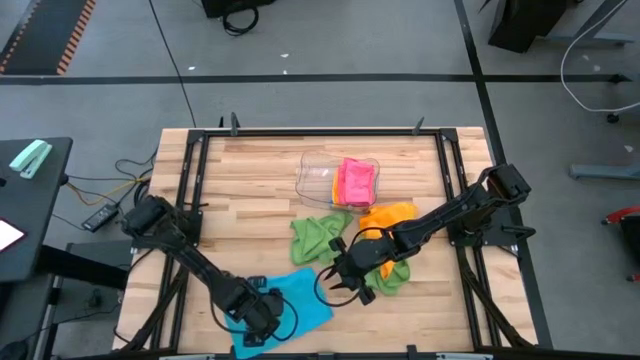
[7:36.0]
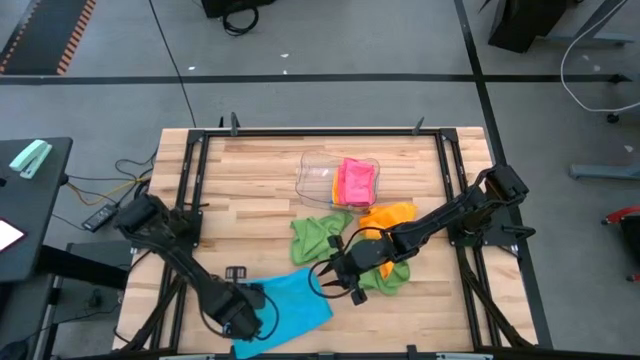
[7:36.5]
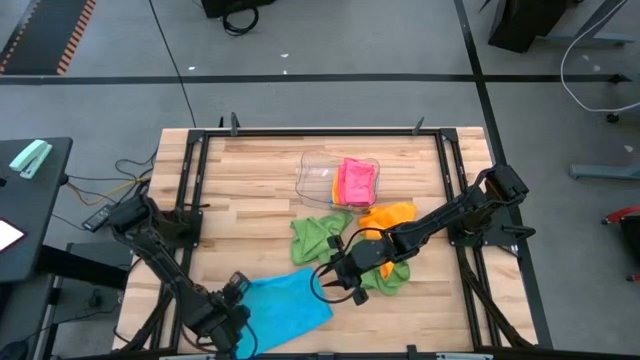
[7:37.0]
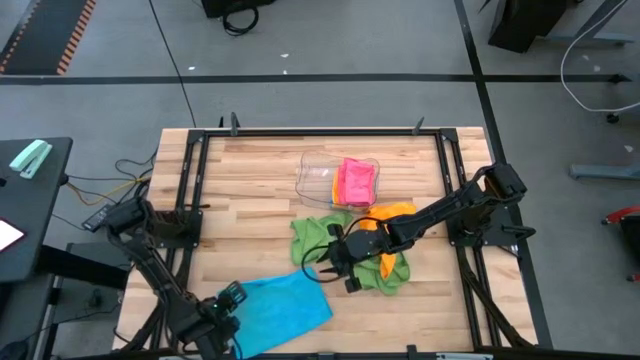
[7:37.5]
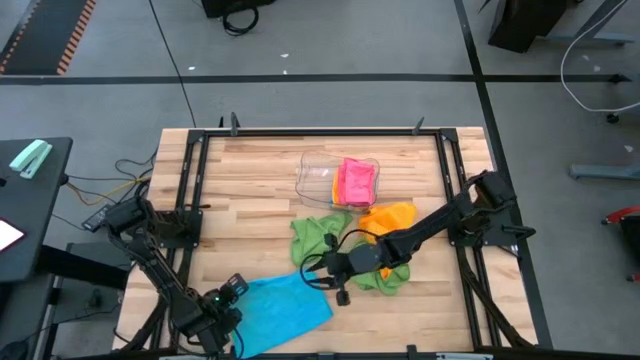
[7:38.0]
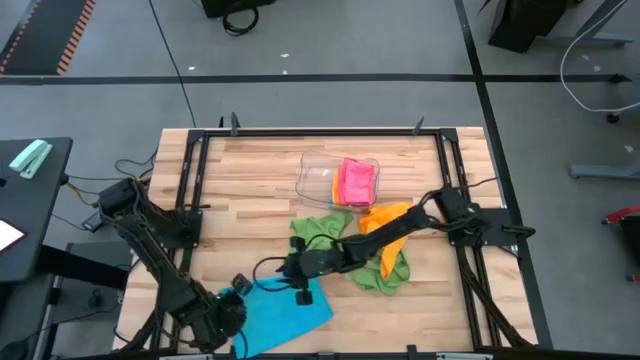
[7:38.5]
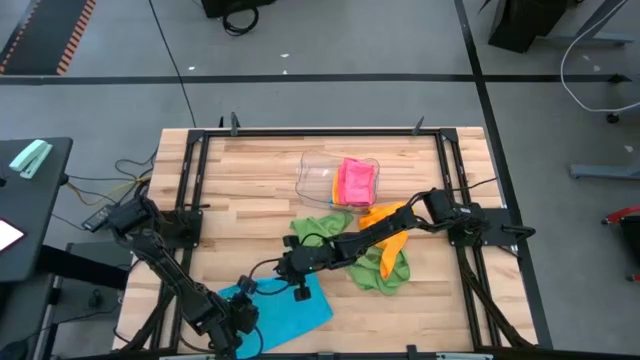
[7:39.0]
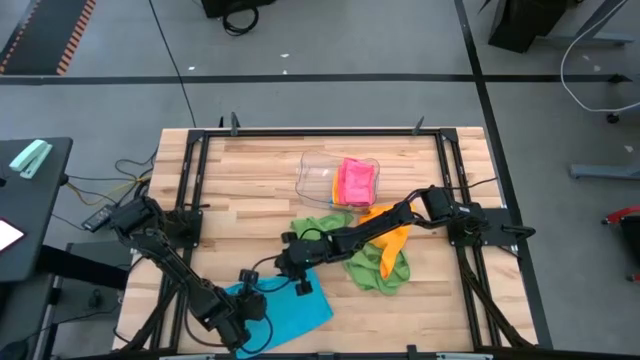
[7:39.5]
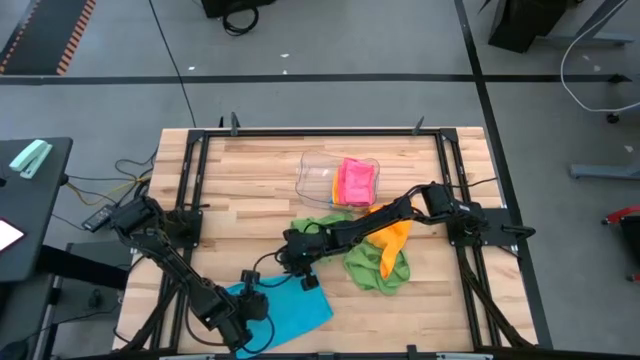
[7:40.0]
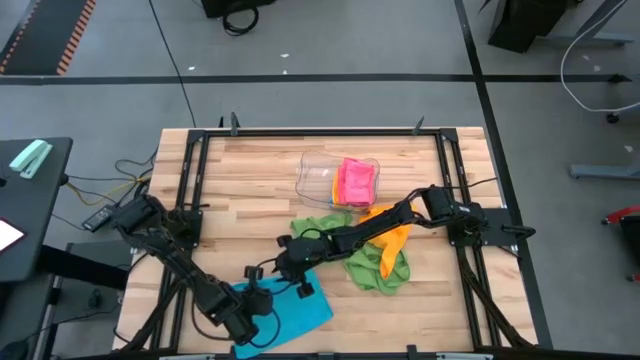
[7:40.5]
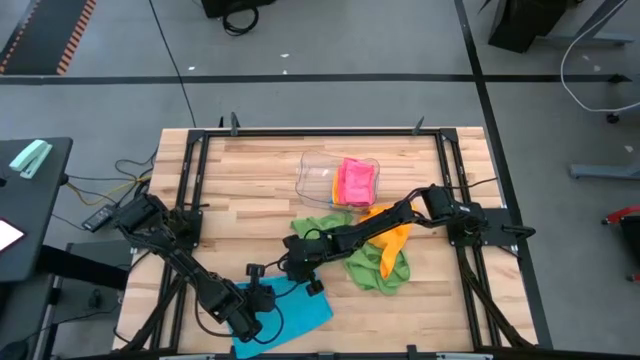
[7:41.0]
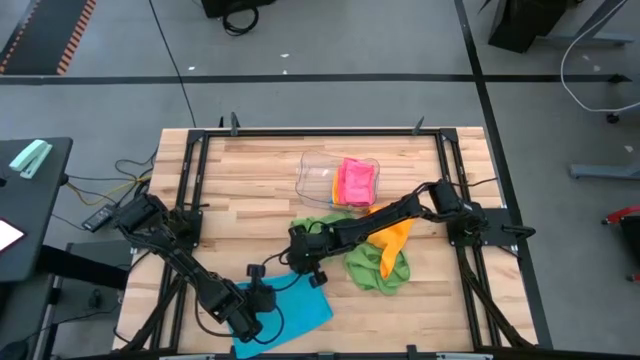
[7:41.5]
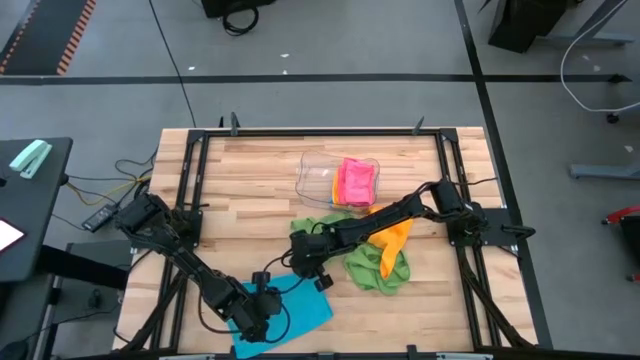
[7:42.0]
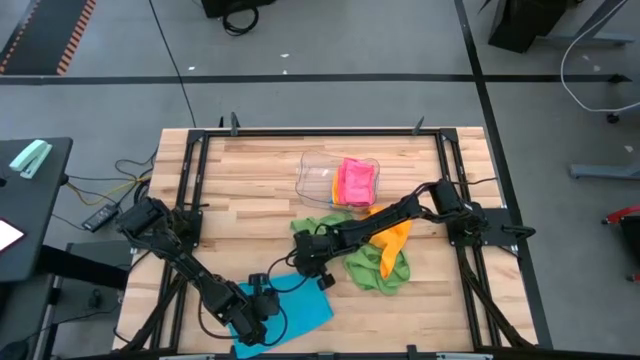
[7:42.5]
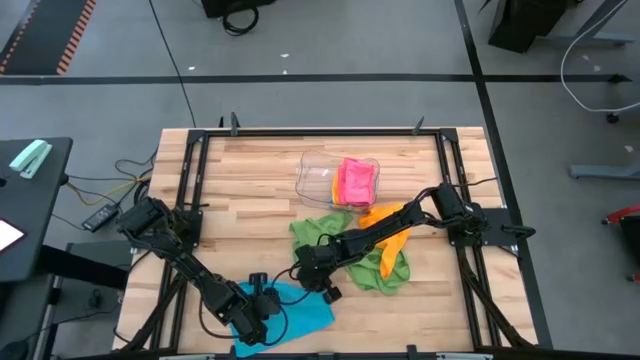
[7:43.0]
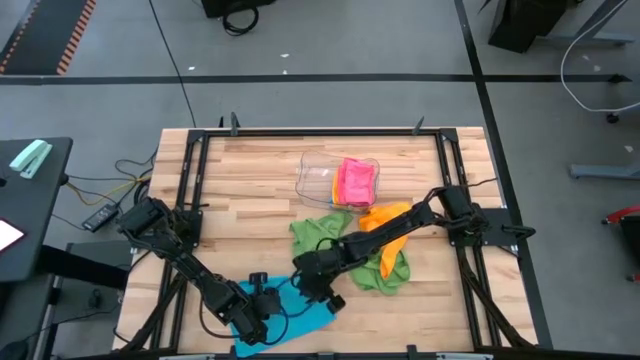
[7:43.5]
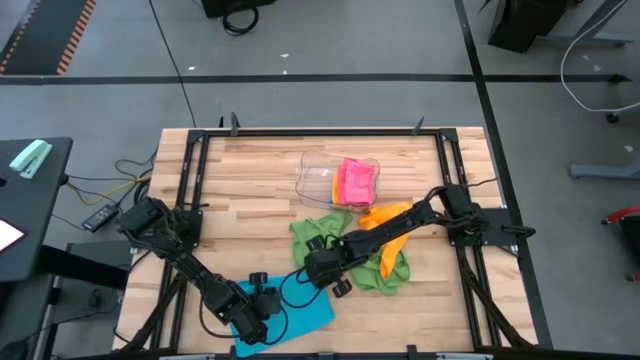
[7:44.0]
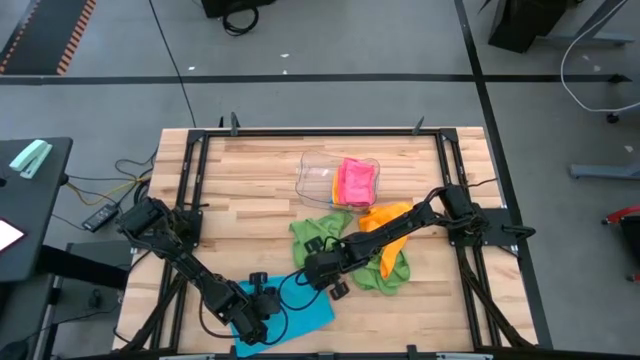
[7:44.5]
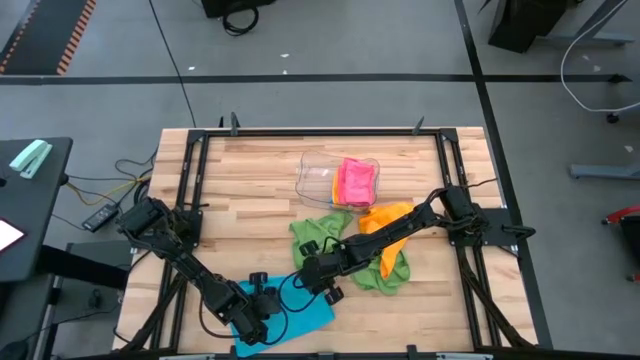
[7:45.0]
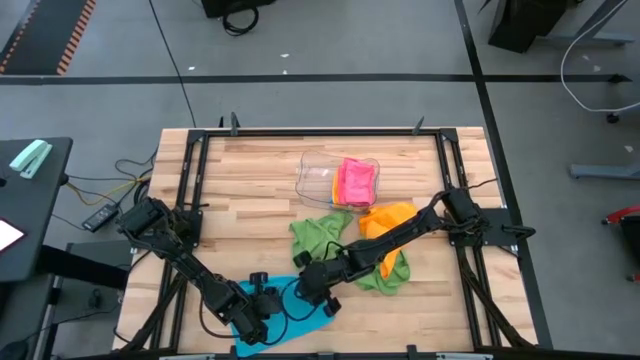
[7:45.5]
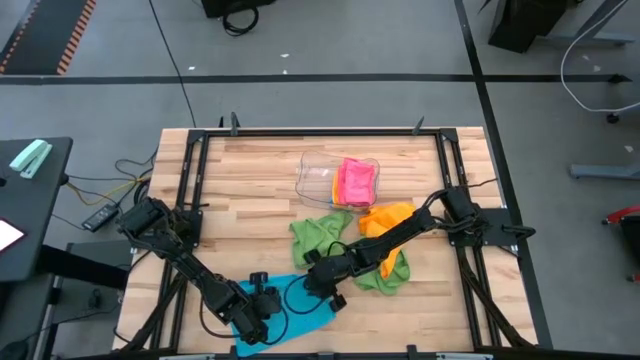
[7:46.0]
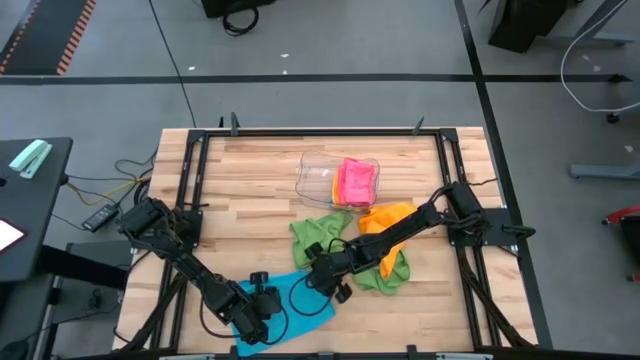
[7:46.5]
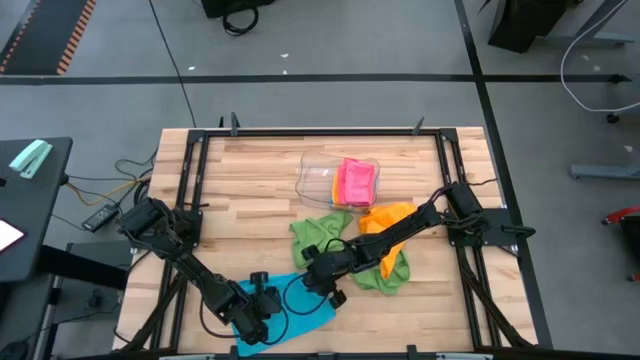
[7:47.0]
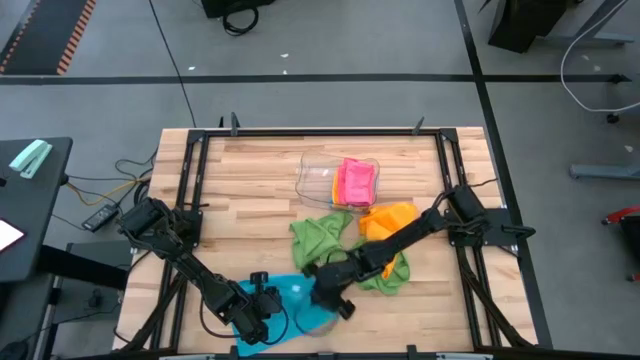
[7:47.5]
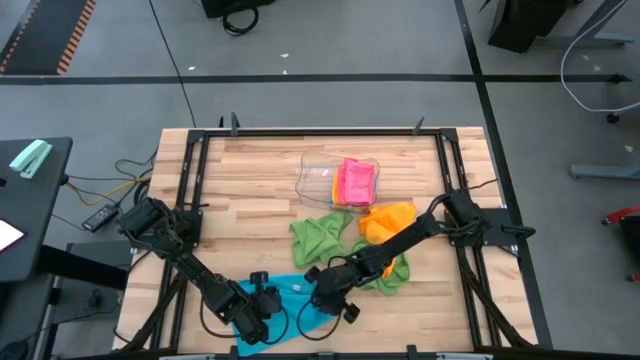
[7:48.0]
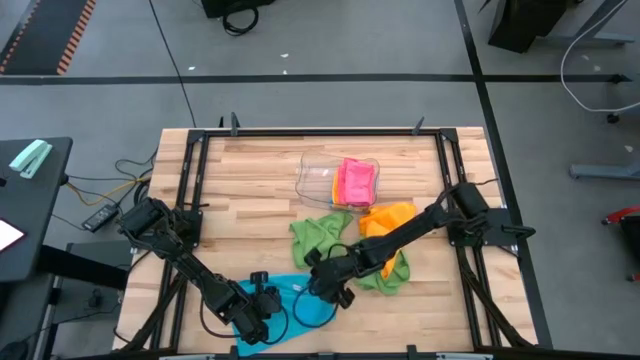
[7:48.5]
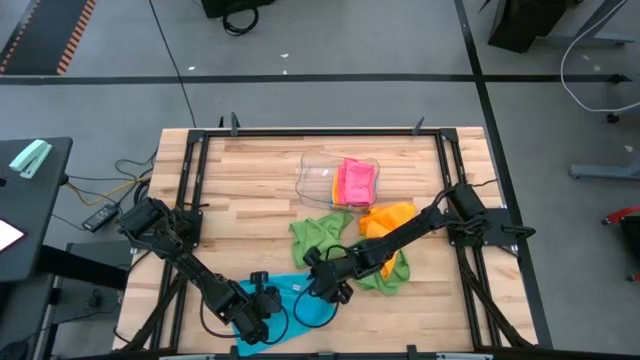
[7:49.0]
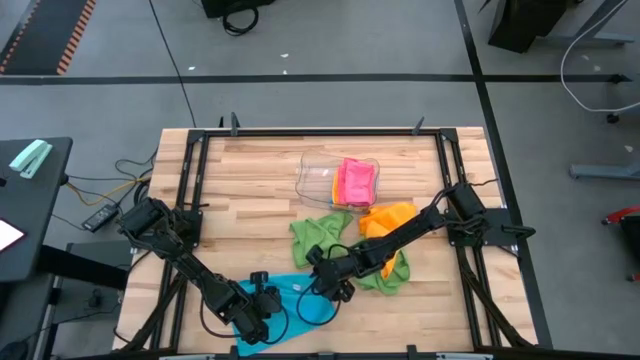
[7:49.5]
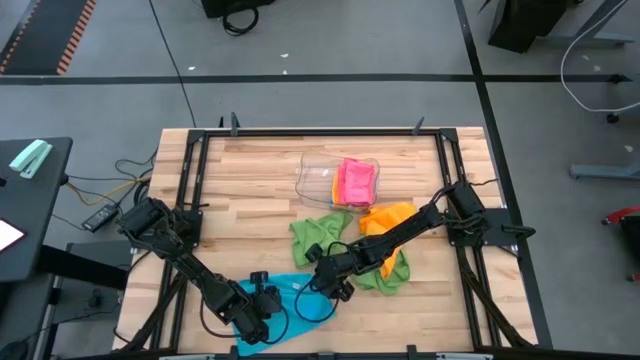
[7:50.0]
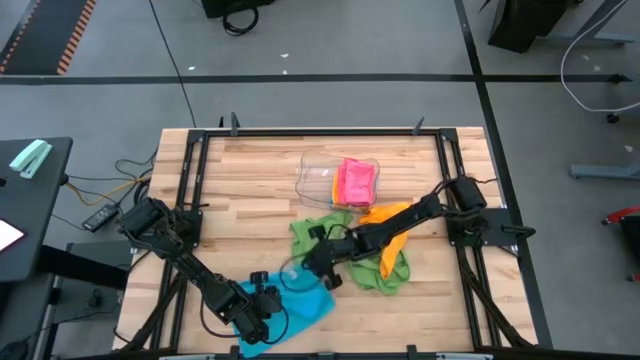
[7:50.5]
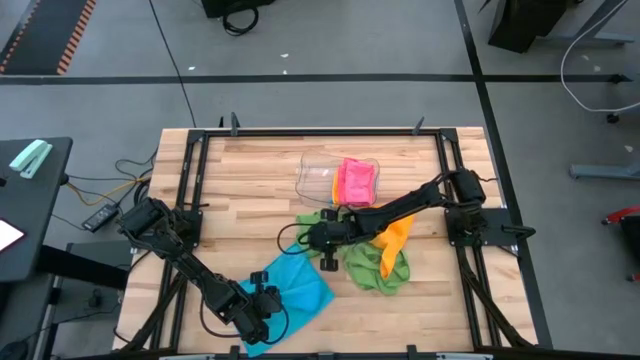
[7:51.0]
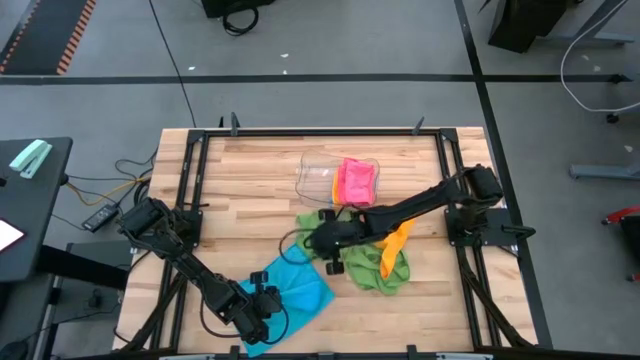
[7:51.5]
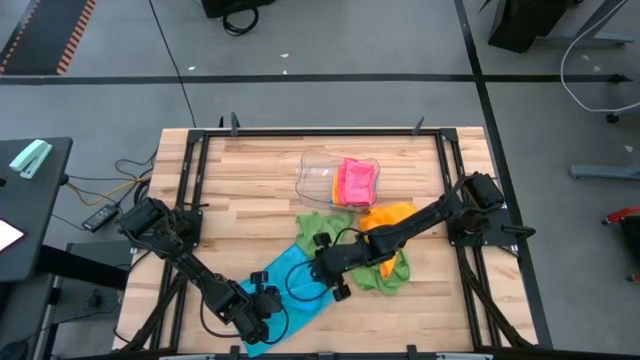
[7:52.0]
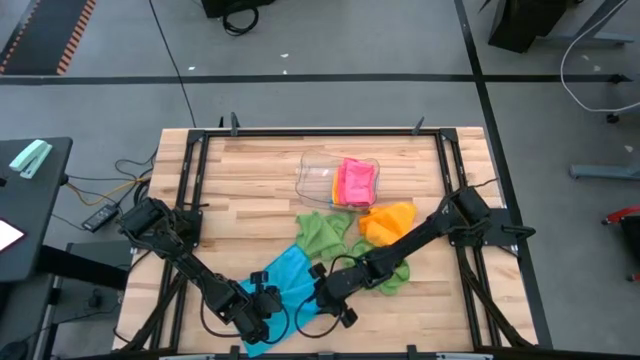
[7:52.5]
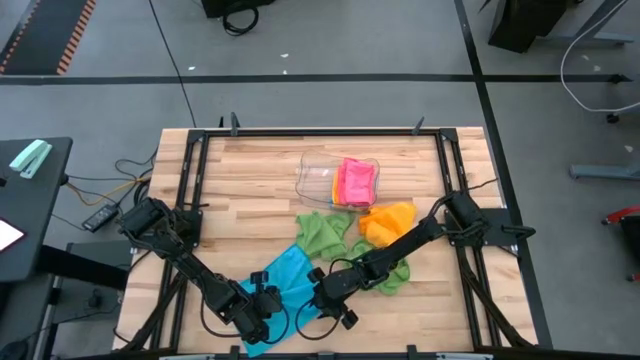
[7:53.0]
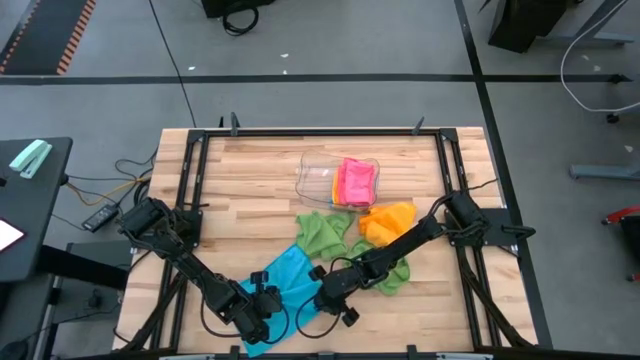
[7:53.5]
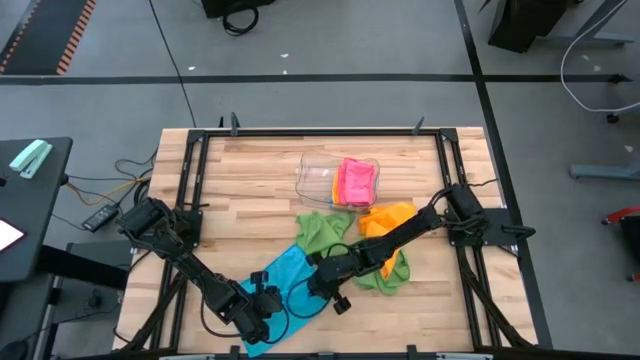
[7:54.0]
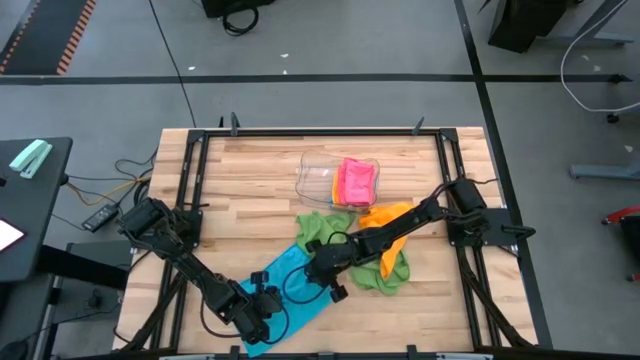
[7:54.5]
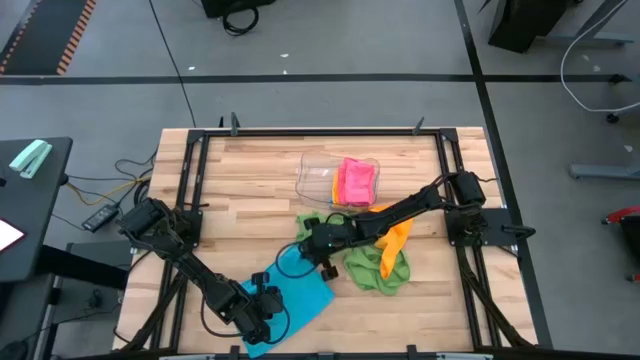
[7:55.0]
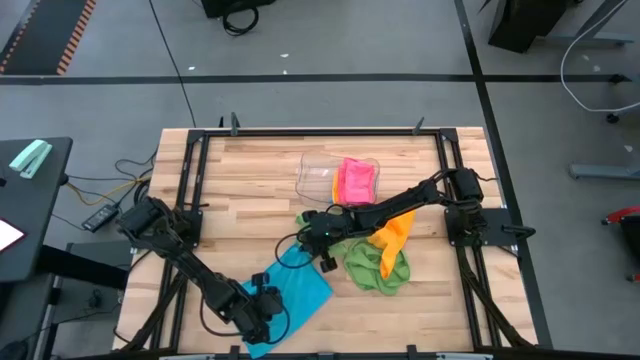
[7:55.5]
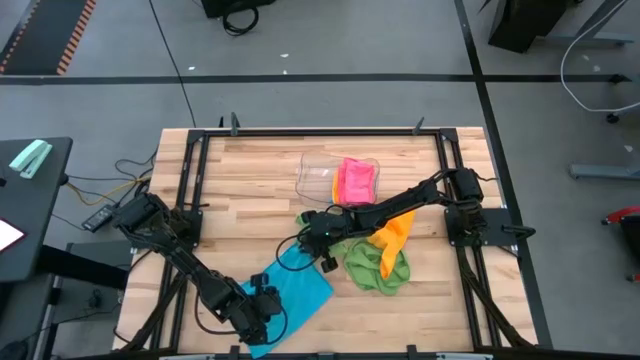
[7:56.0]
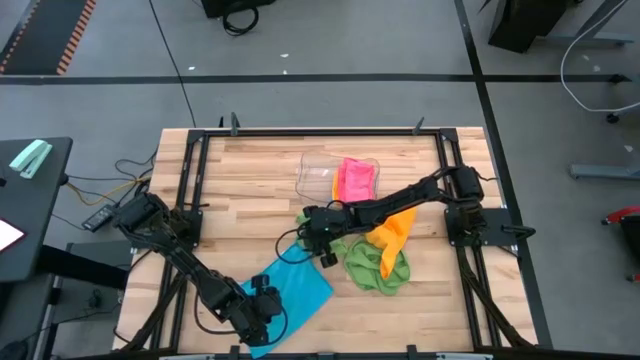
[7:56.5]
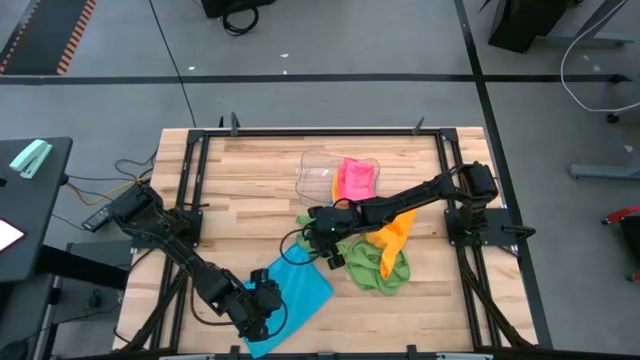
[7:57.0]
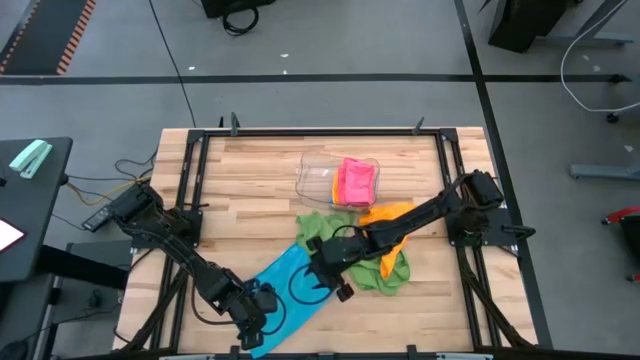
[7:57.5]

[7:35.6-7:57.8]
Task: Fold microfiber towels
Fold the blue microfiber cloth
